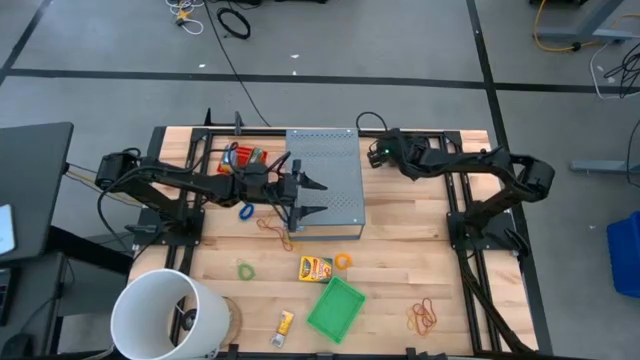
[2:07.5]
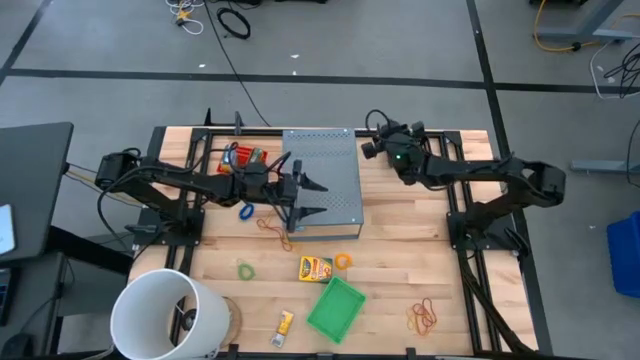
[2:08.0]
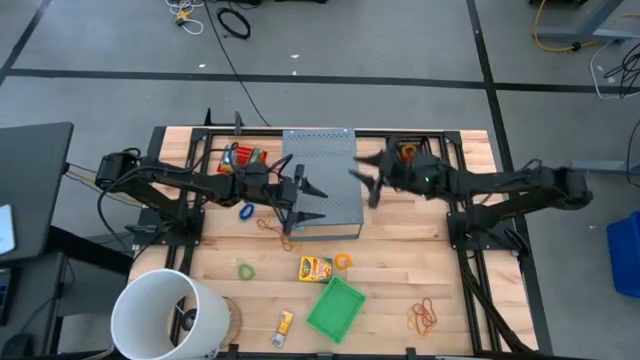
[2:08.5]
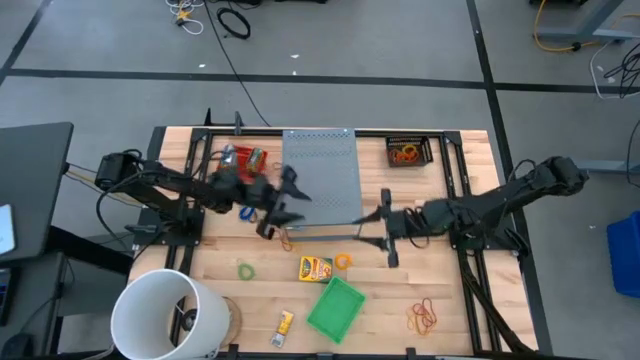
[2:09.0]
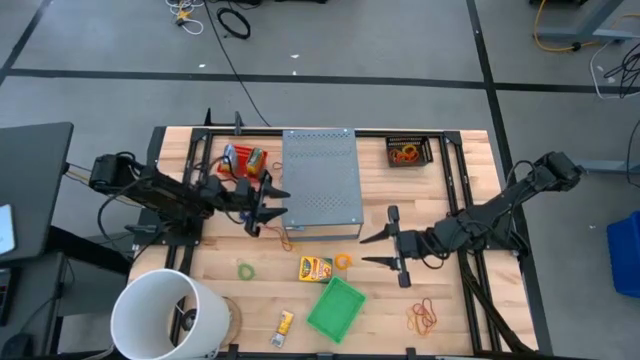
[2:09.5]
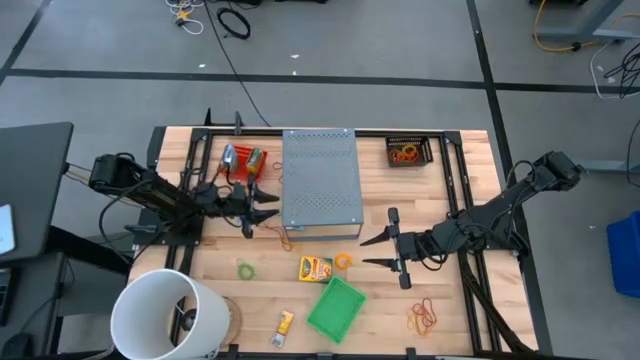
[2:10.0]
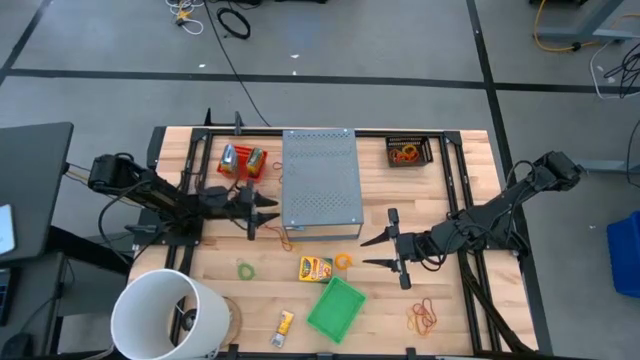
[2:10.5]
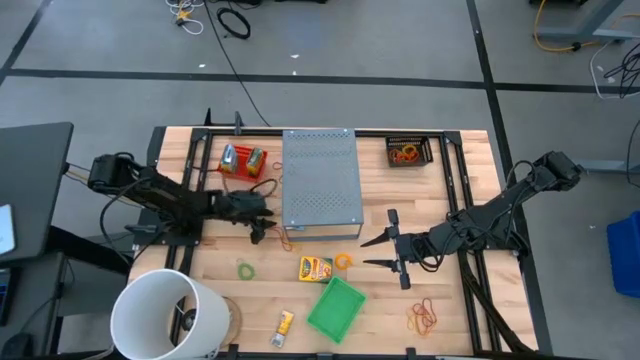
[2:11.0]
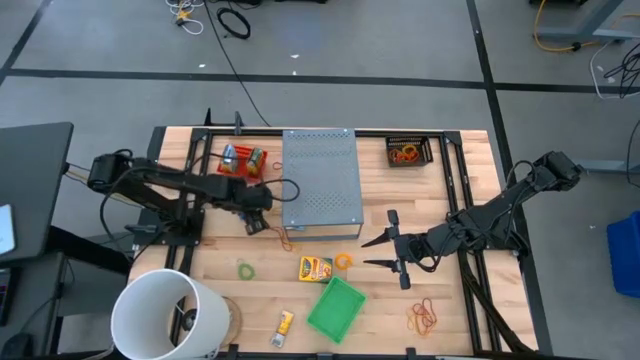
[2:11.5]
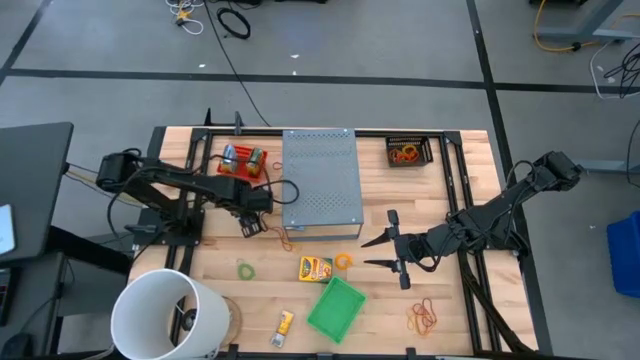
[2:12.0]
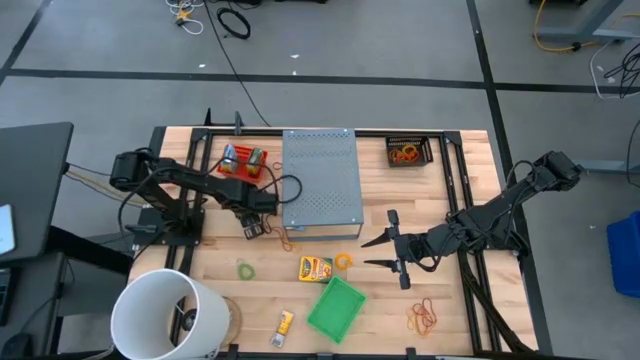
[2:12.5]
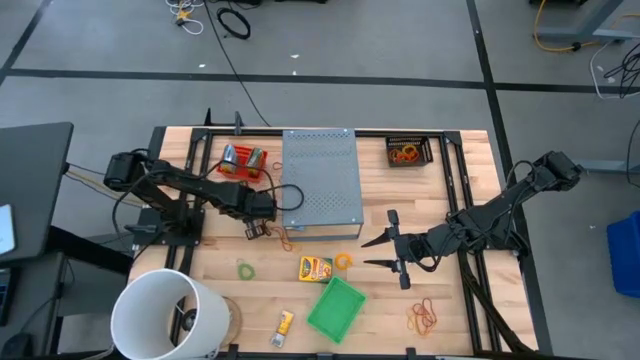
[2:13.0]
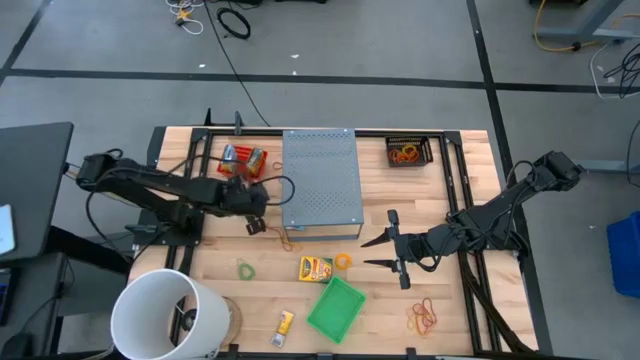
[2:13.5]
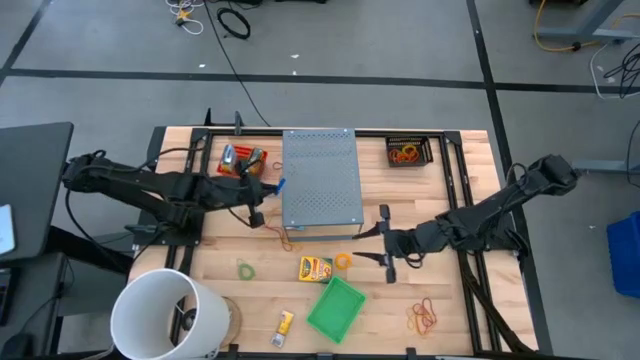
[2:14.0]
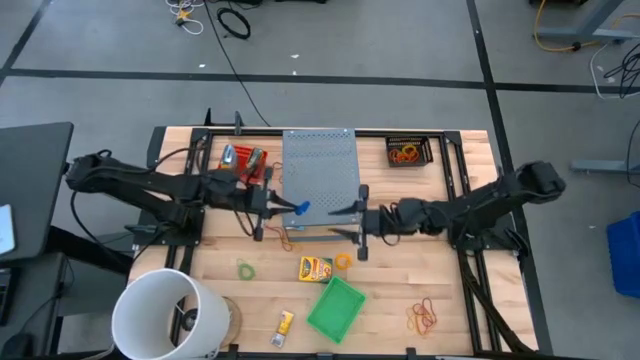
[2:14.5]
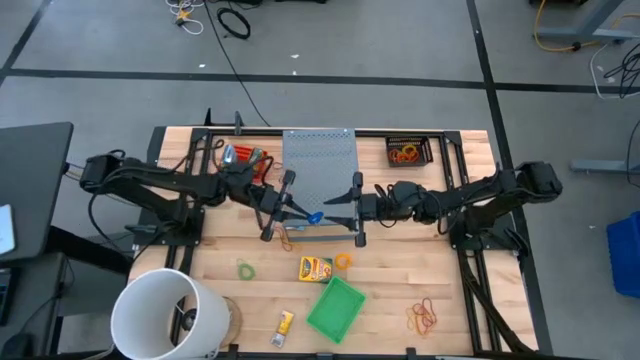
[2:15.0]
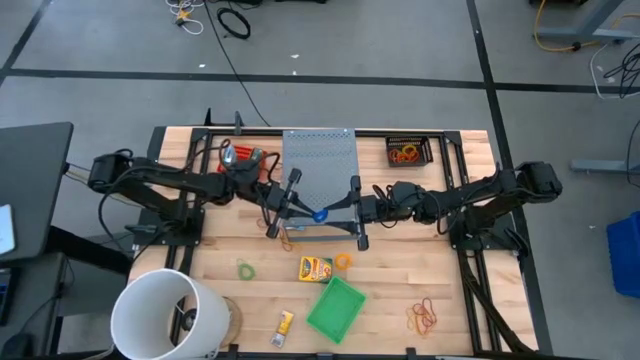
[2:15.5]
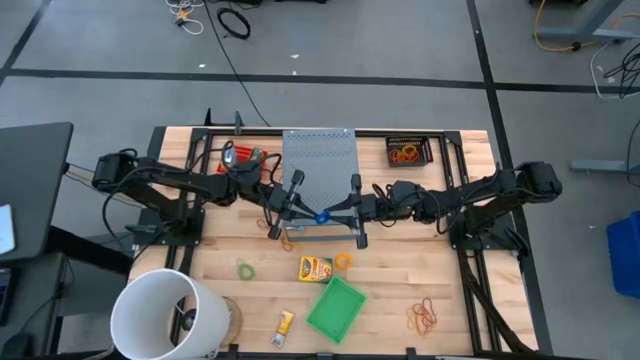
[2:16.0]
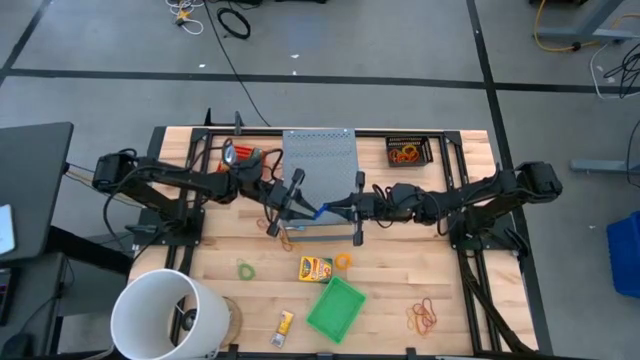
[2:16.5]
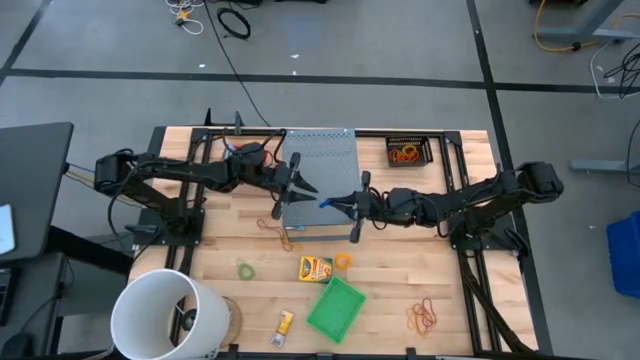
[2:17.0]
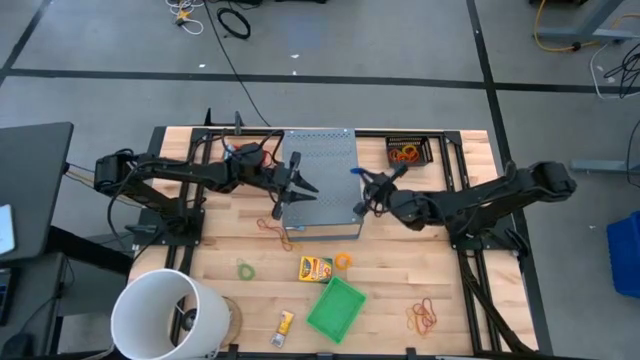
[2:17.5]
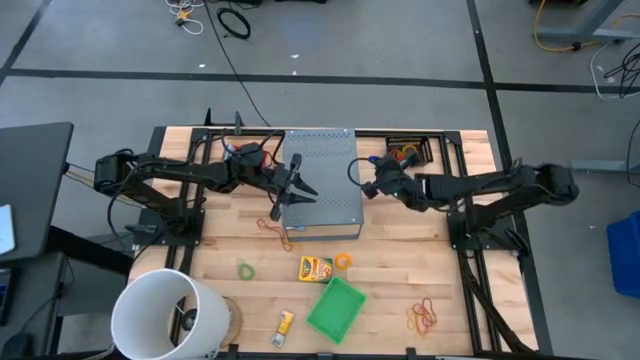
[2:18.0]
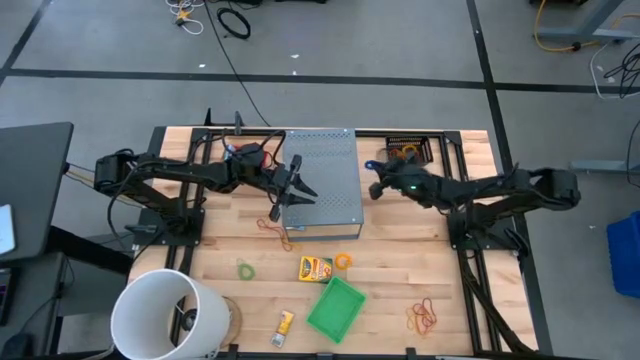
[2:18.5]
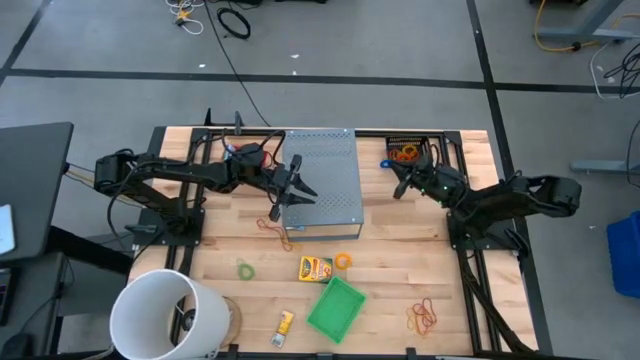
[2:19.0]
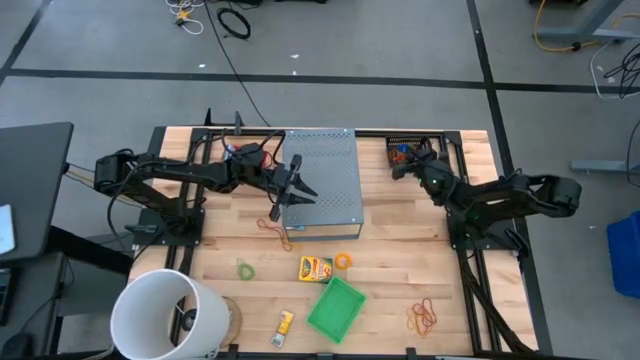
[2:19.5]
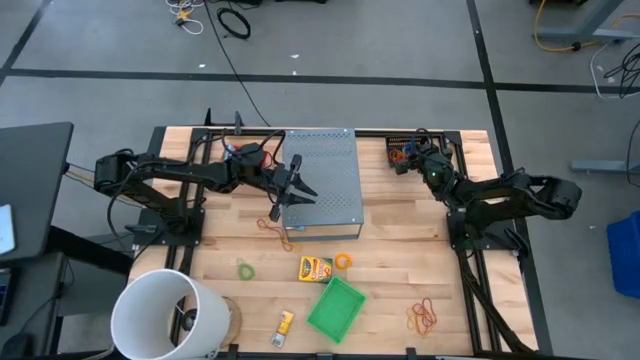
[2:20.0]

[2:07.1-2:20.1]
Task: Pick & Place Office Desk Supplies
Put the blue spring keychain into the black basket

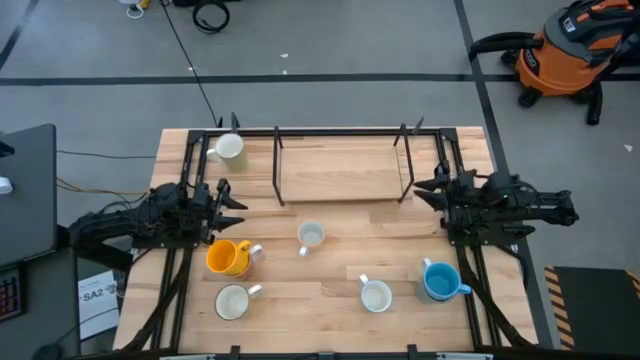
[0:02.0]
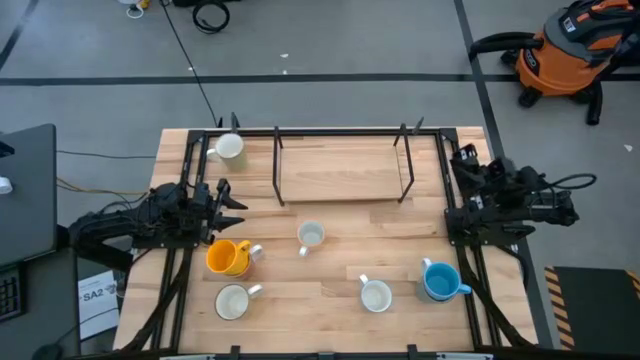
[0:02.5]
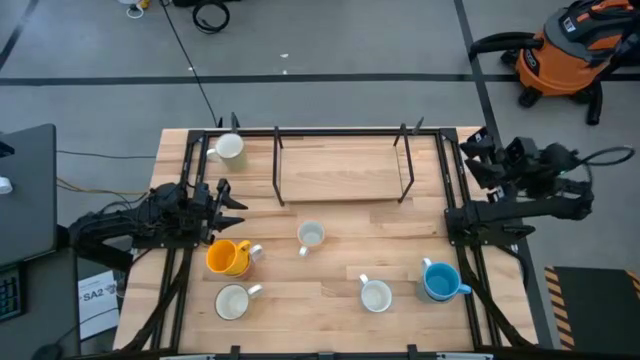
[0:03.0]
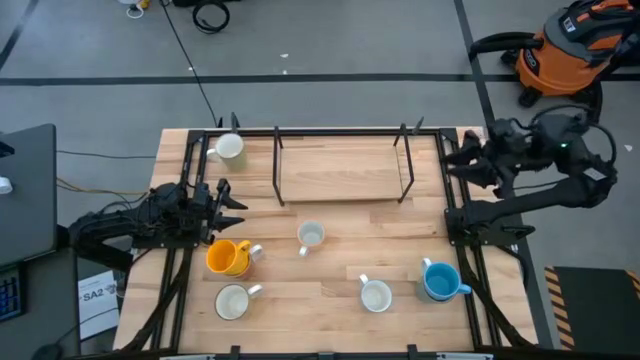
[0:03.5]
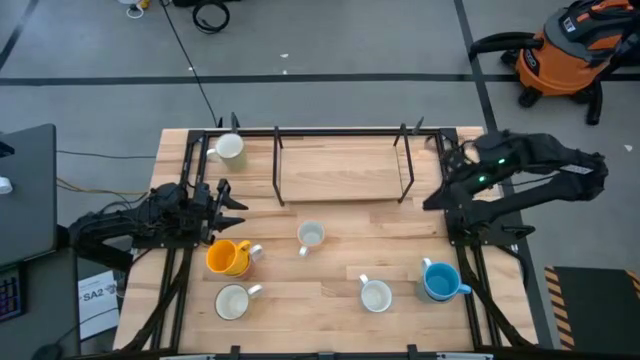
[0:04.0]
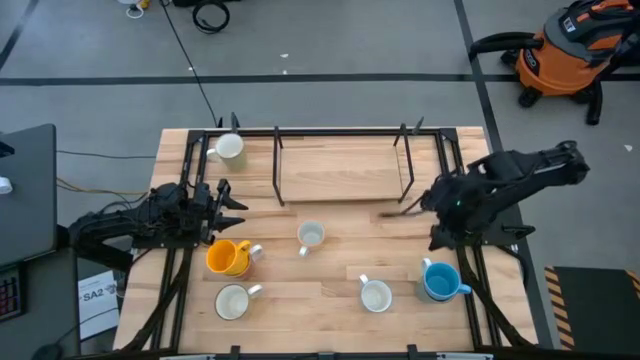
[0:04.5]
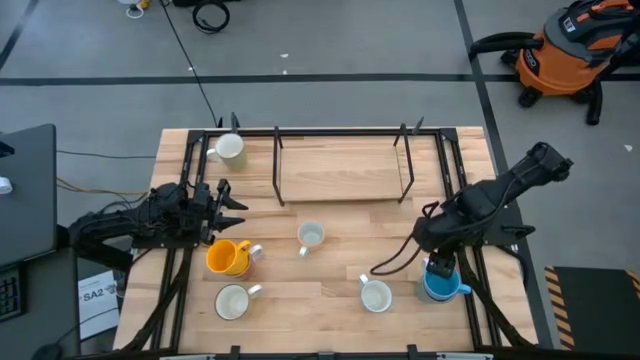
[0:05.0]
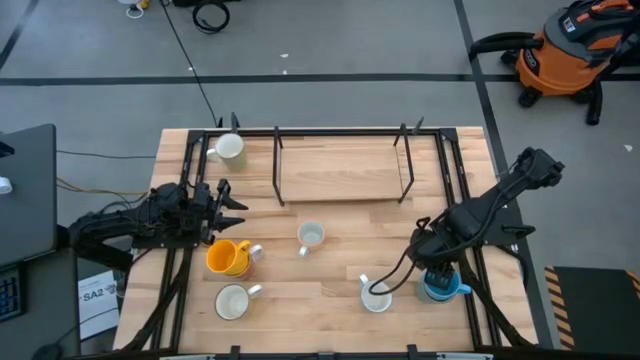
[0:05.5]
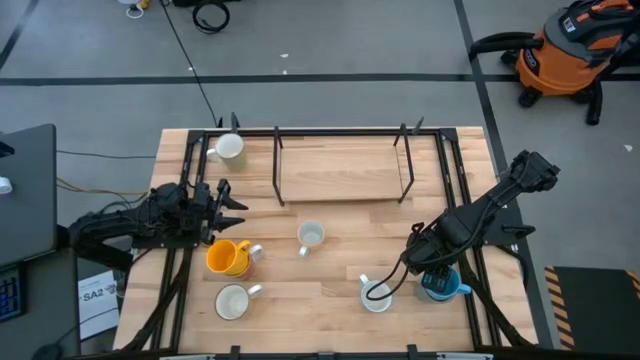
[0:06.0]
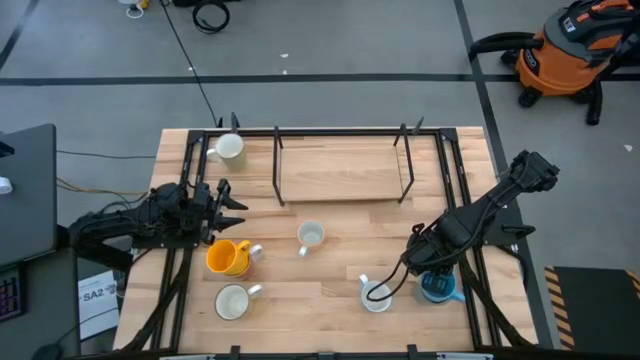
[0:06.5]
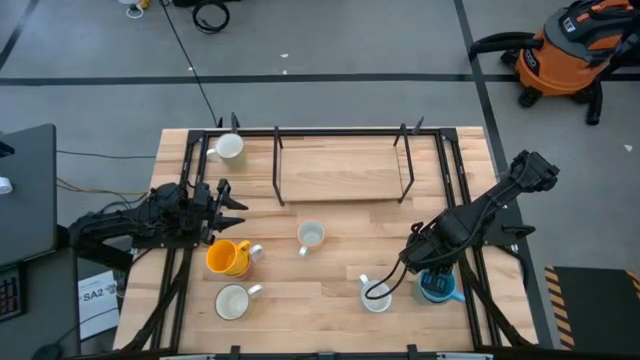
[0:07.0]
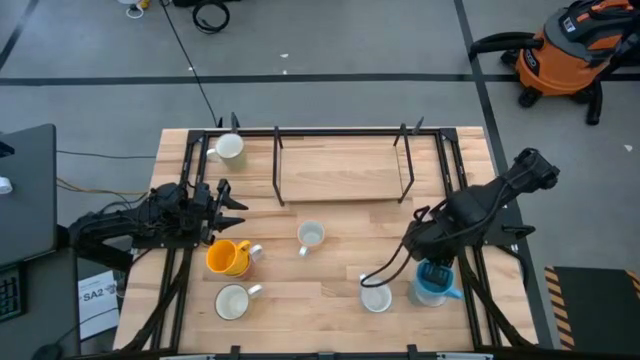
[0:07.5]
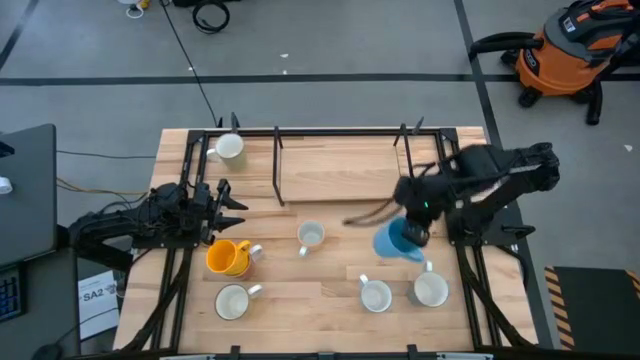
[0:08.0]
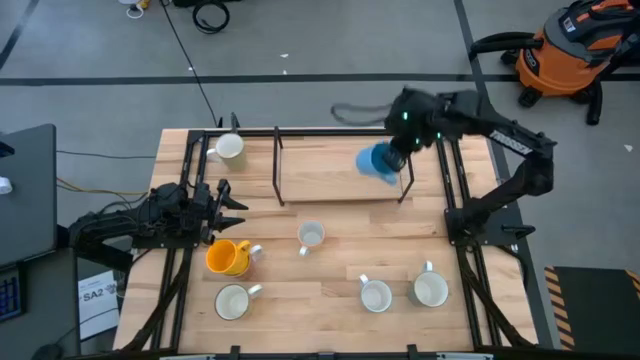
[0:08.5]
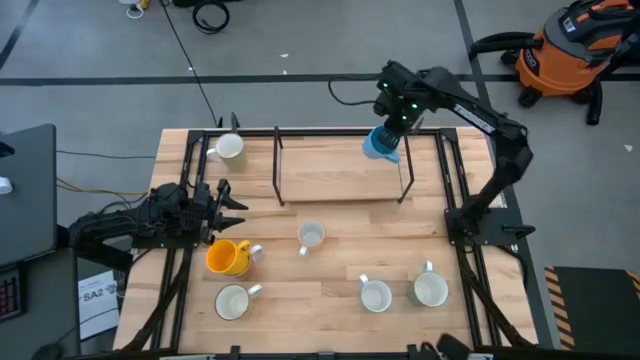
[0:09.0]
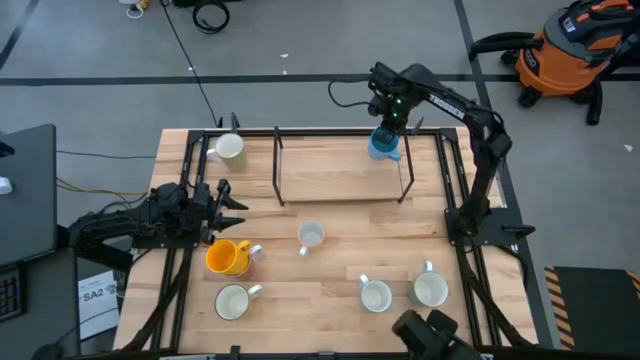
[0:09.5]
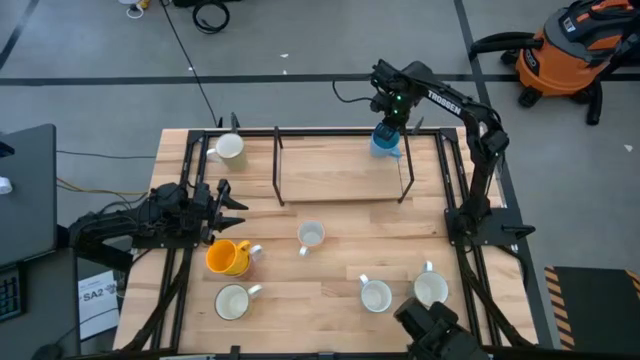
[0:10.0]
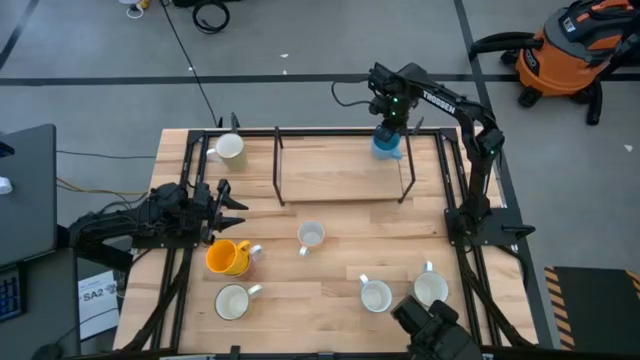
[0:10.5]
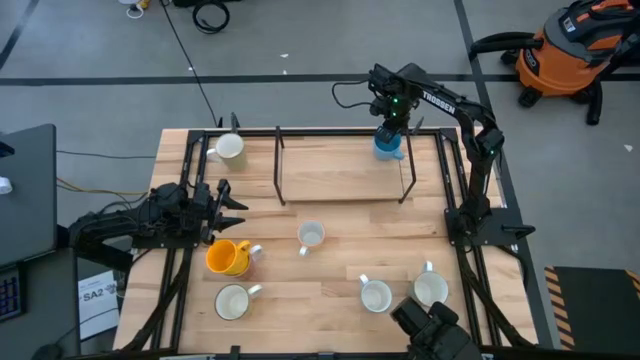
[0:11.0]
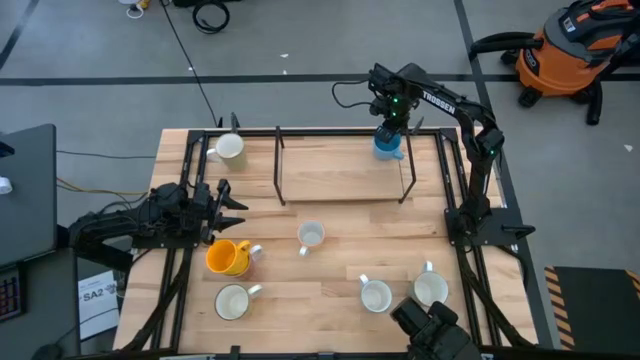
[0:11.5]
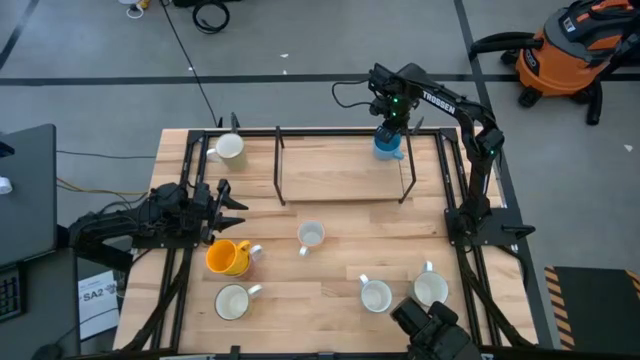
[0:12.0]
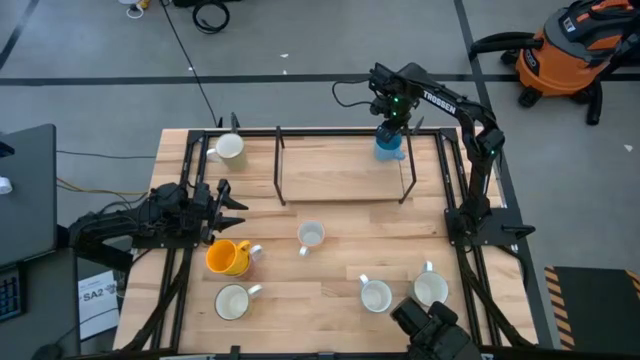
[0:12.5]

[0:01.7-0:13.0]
Task: Place coffee mugs
Put the blue mug on the shelf
